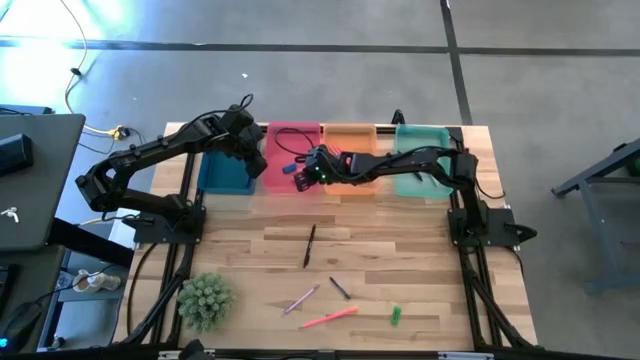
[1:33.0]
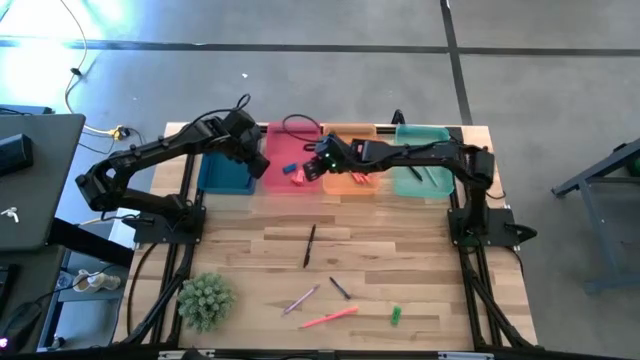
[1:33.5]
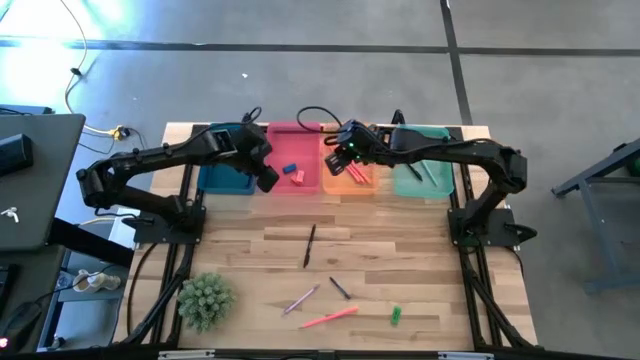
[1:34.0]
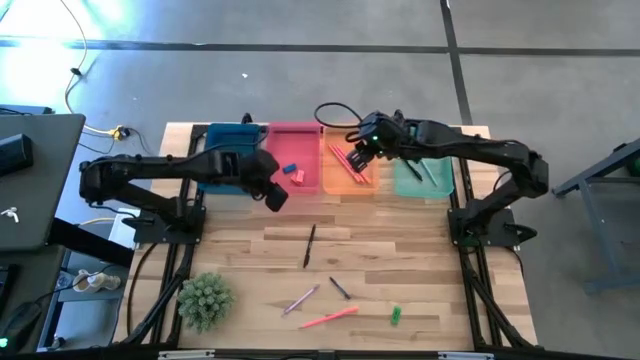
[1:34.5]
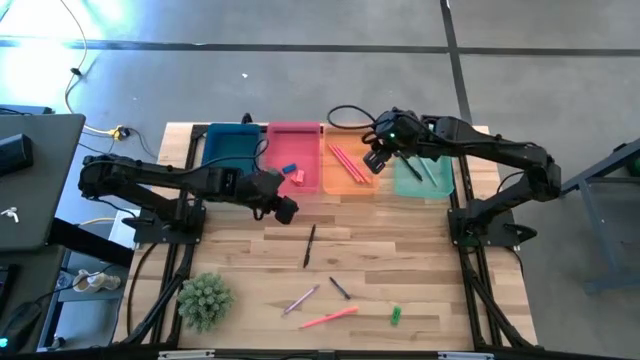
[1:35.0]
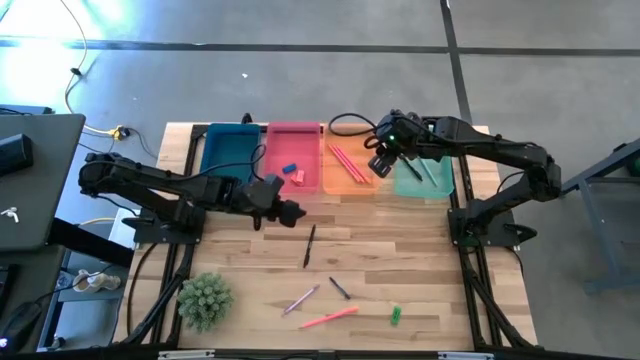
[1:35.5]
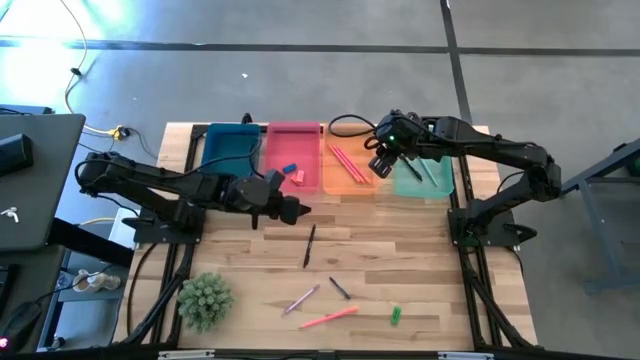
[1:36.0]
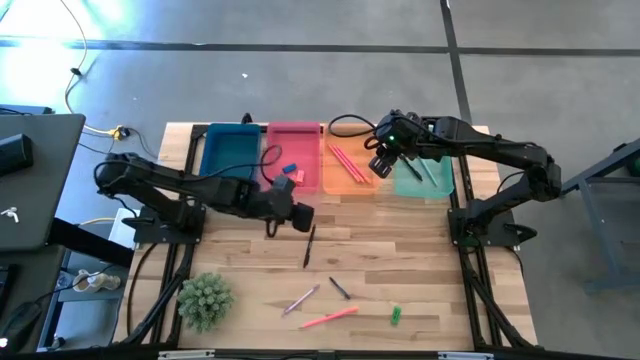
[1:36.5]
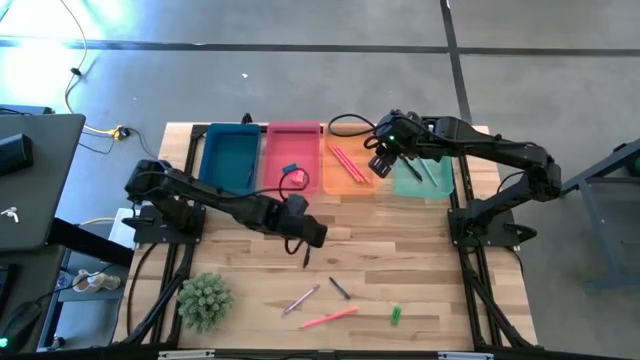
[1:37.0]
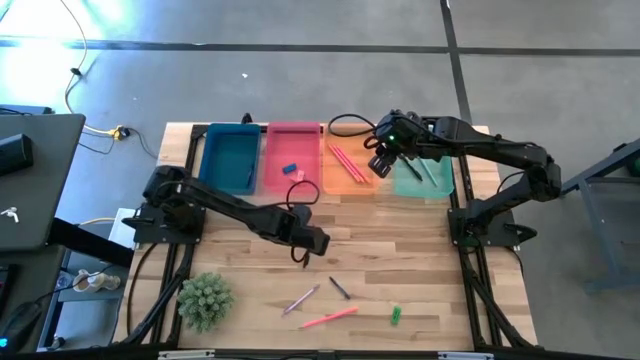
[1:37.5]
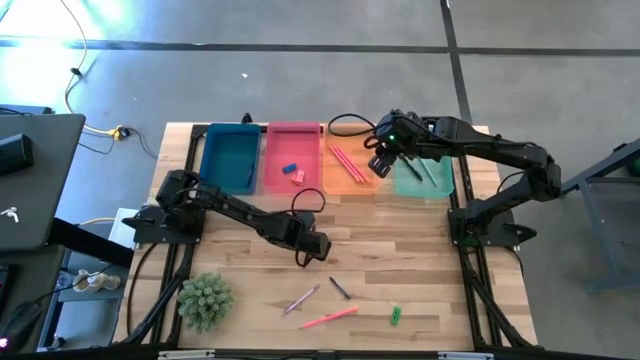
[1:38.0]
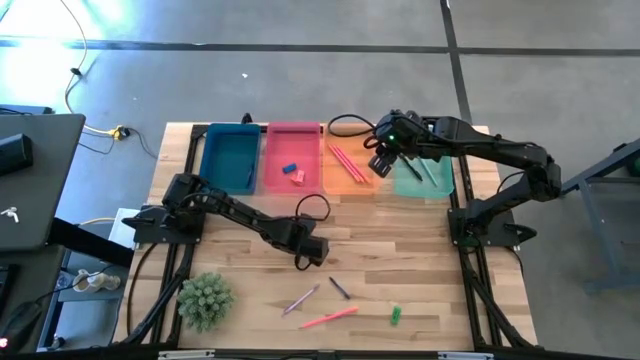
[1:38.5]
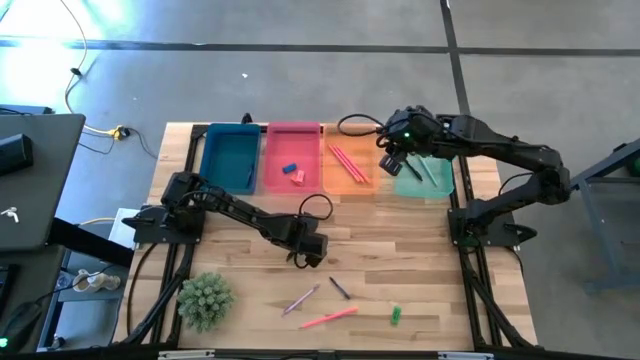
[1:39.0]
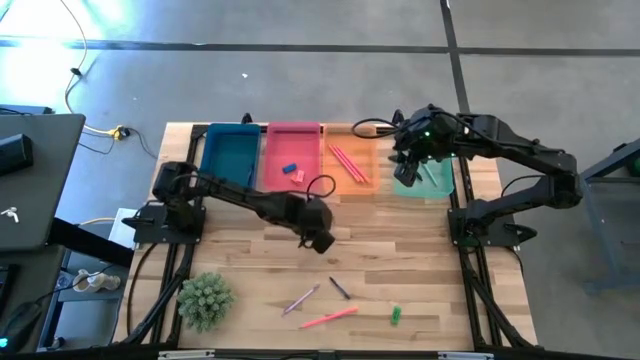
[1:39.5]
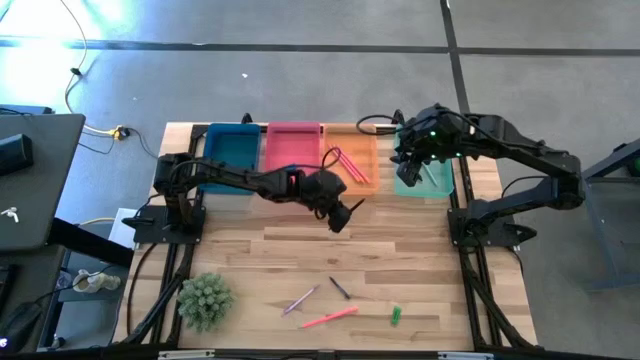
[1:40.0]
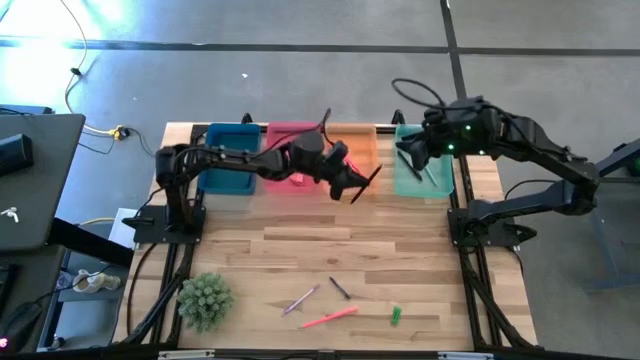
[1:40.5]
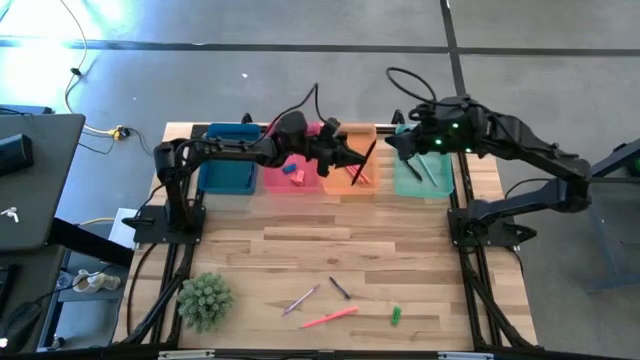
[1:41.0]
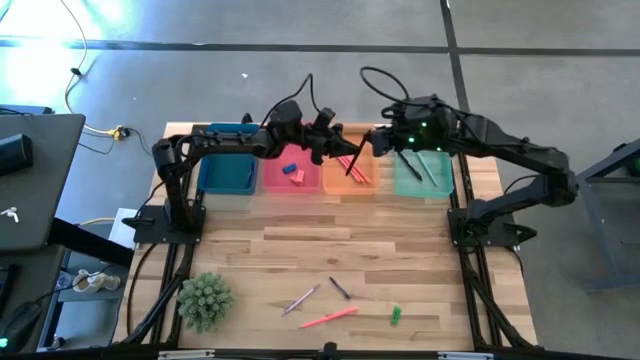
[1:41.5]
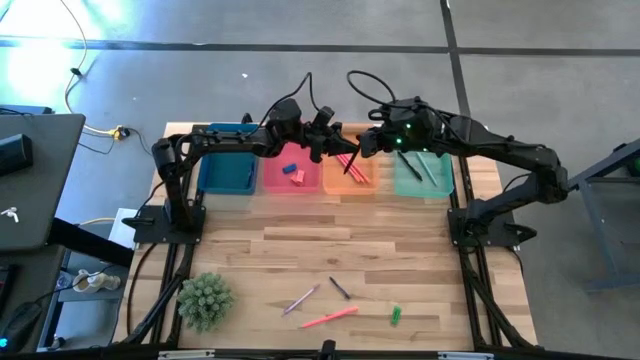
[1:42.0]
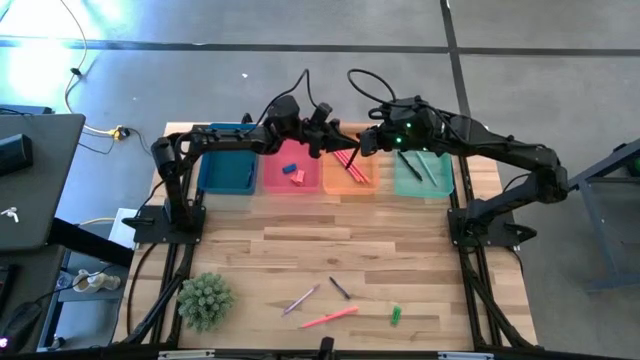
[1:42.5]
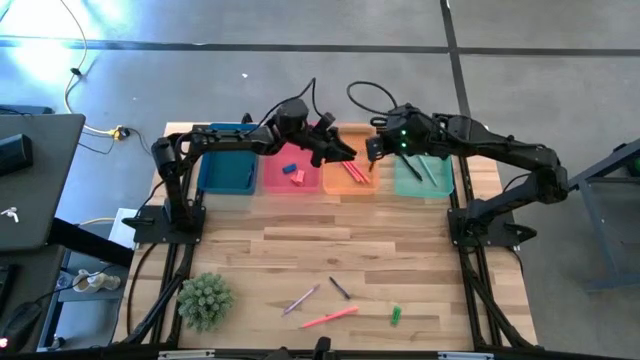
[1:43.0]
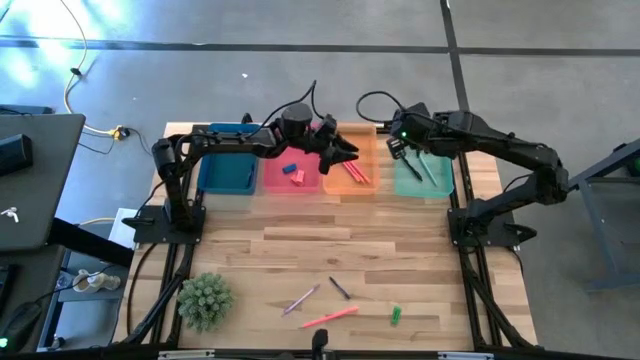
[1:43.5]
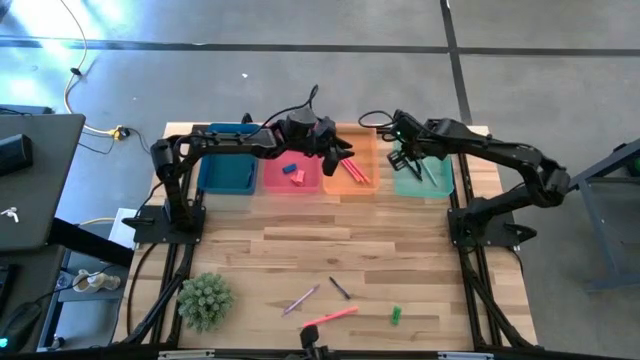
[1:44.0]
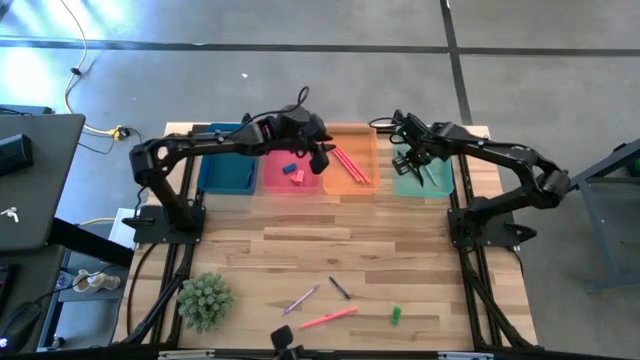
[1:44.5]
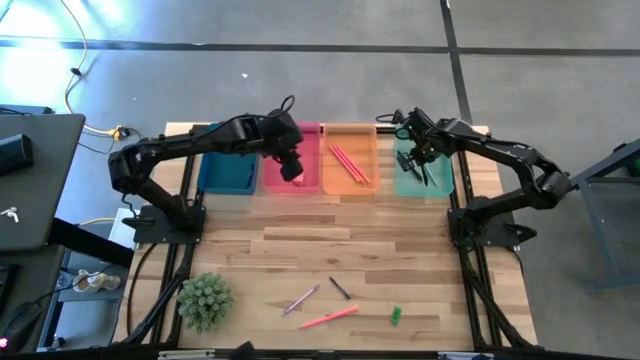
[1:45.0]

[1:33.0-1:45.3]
Task: Sort crayons/erasers/pens/pencils in bins
Put the black pen into the green bin

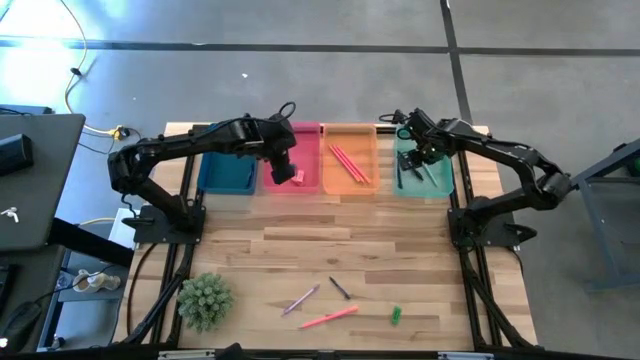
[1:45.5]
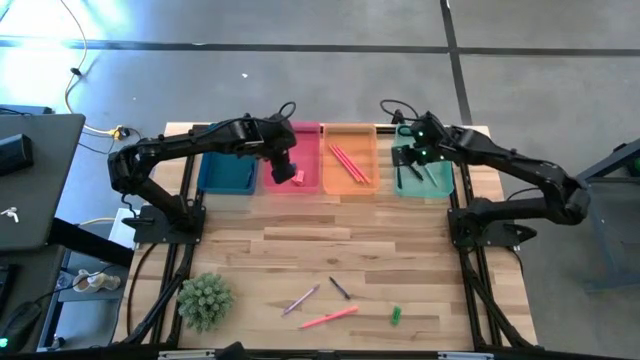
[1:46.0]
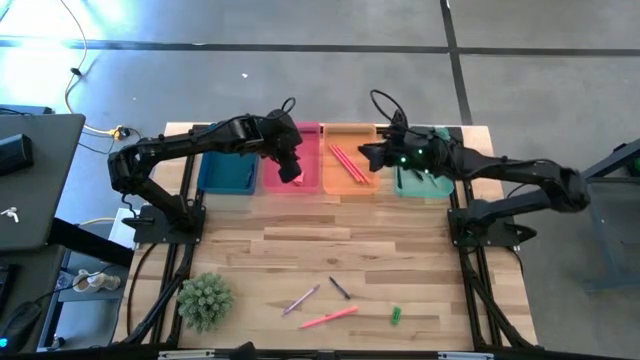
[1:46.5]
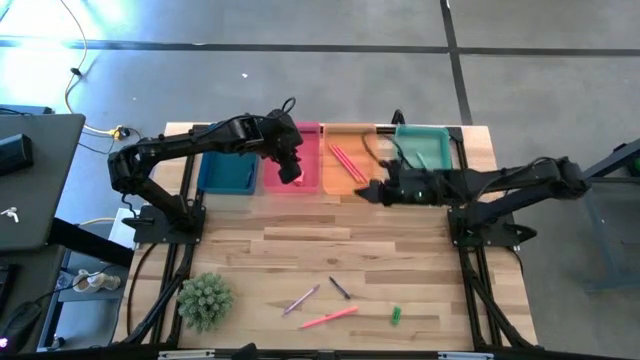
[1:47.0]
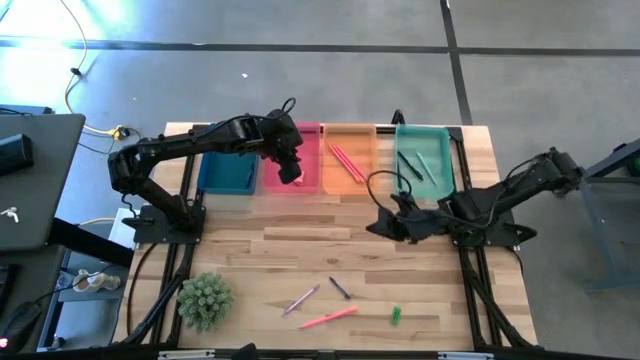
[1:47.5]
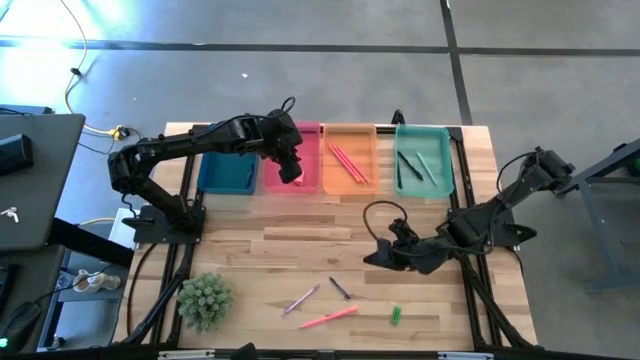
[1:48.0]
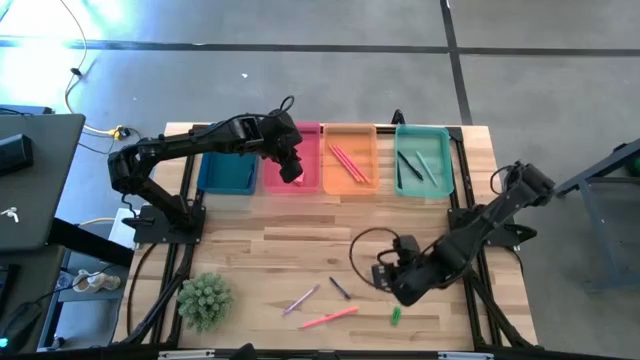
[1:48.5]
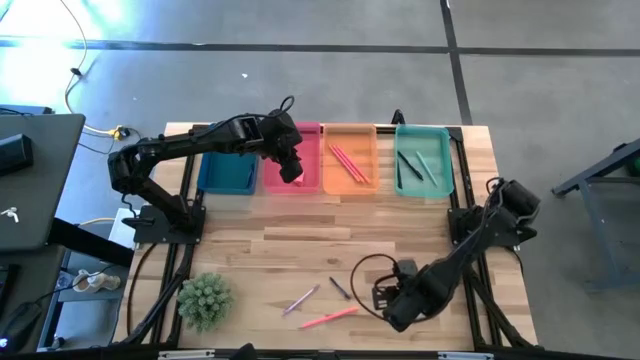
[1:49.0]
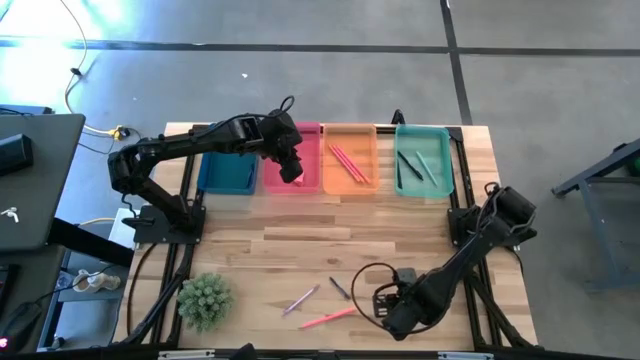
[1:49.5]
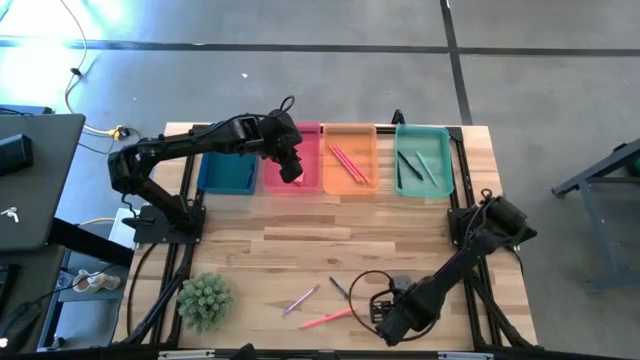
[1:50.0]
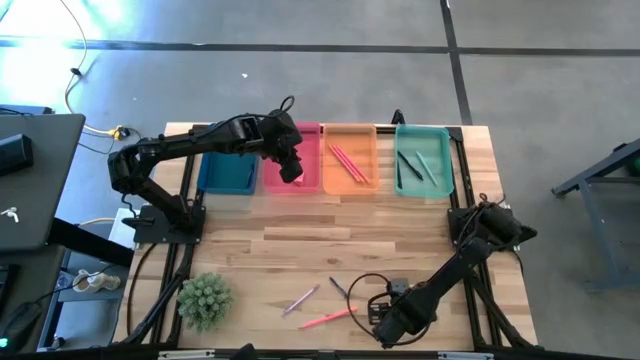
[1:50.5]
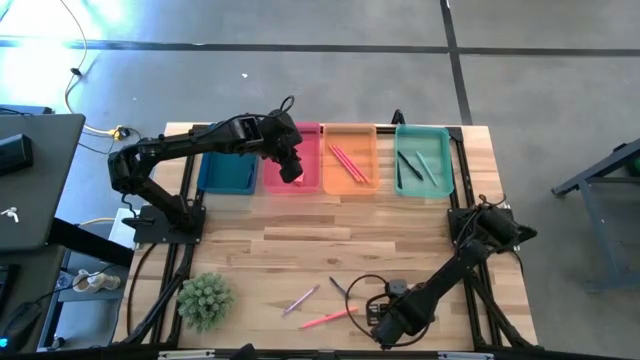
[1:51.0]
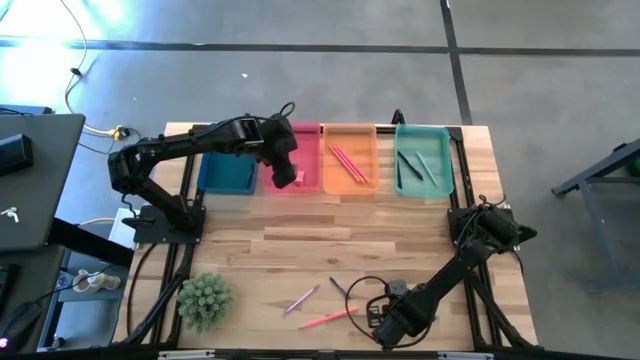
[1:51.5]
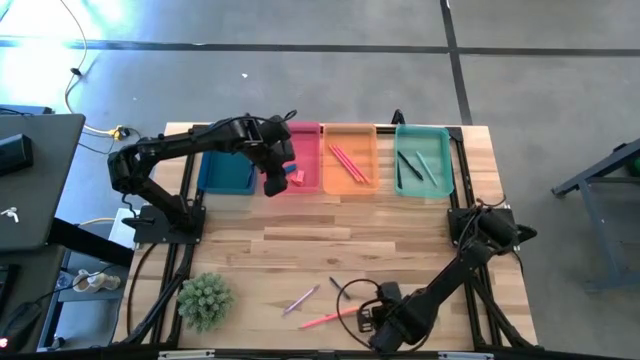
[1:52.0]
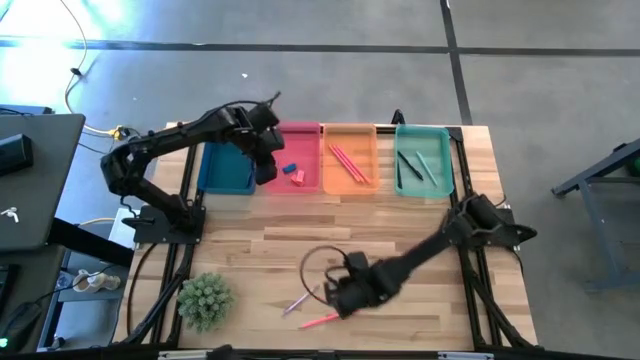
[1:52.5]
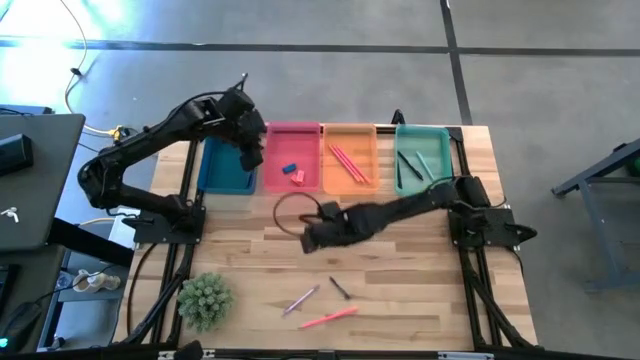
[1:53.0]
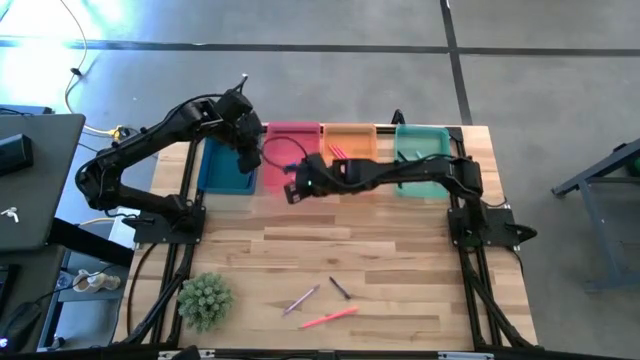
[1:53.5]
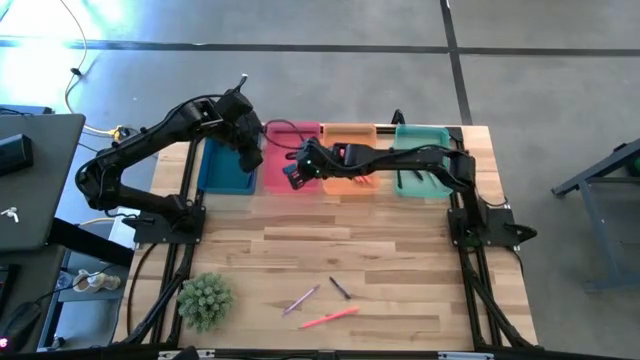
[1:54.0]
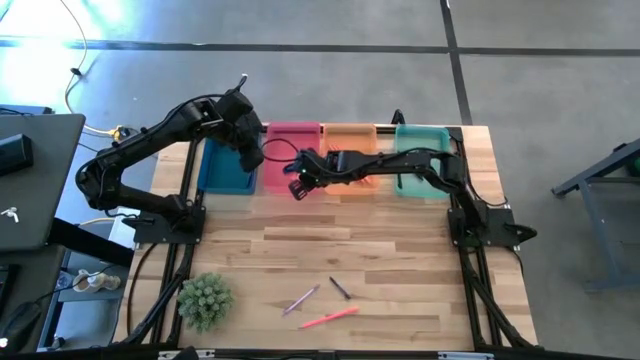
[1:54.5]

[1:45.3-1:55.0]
Put the green eraser into the pink bin
